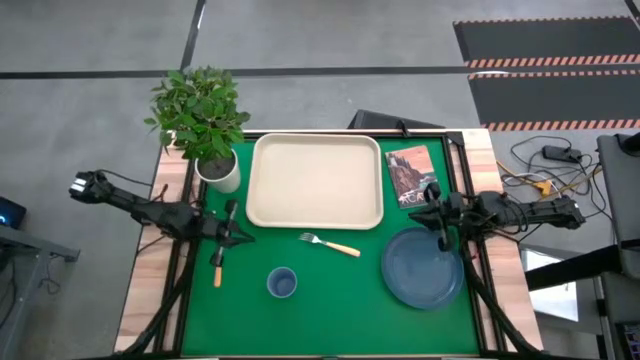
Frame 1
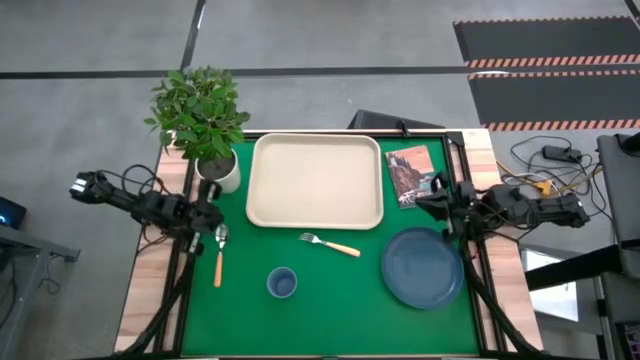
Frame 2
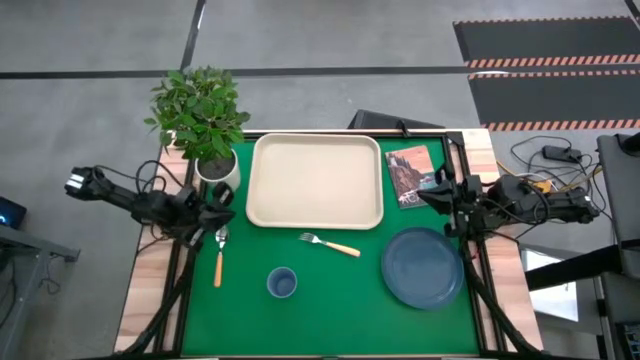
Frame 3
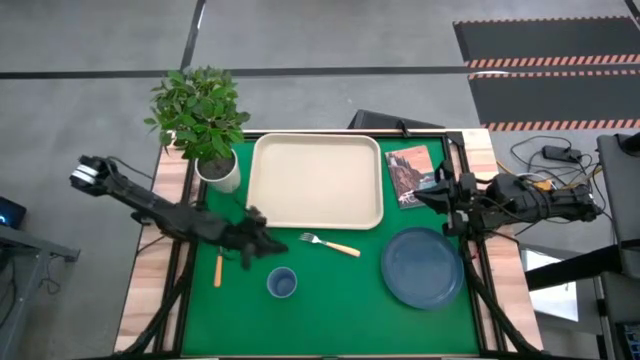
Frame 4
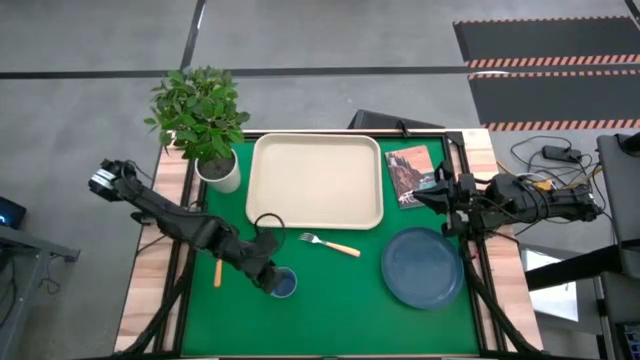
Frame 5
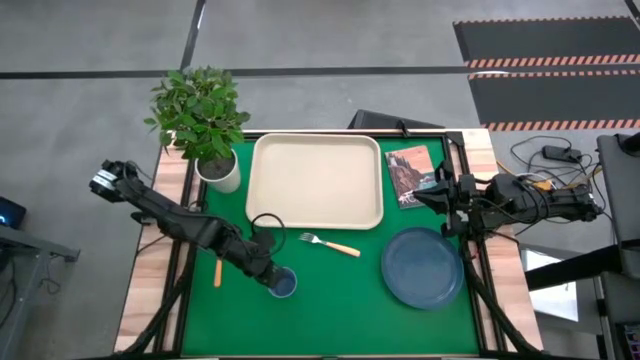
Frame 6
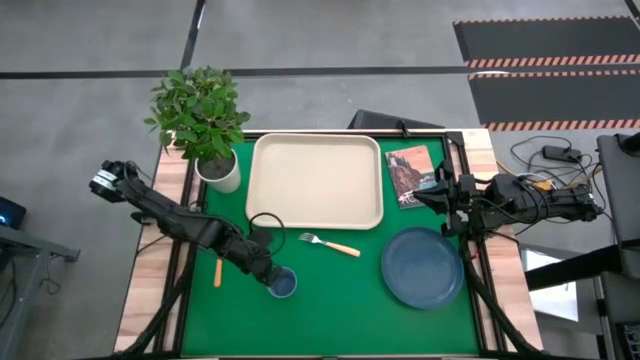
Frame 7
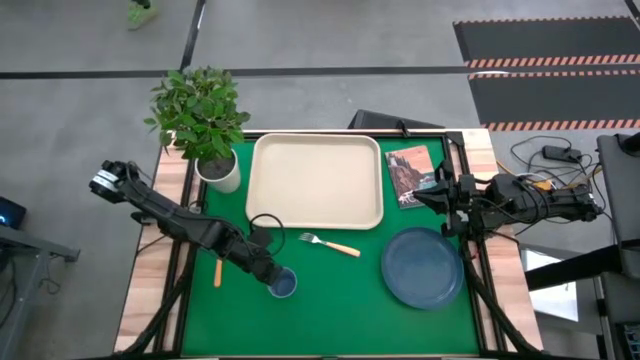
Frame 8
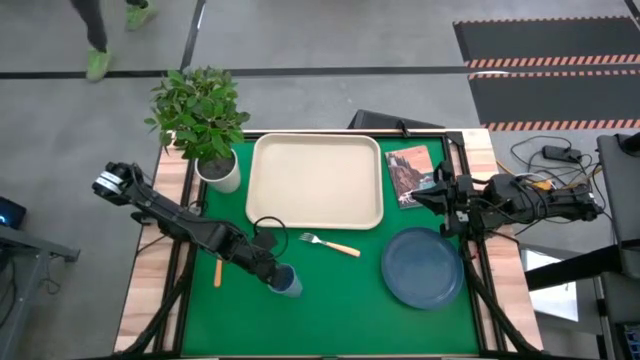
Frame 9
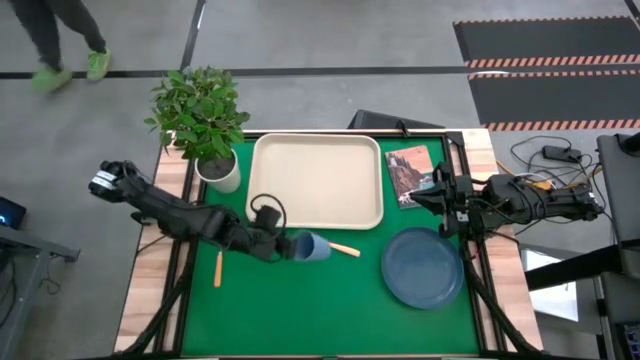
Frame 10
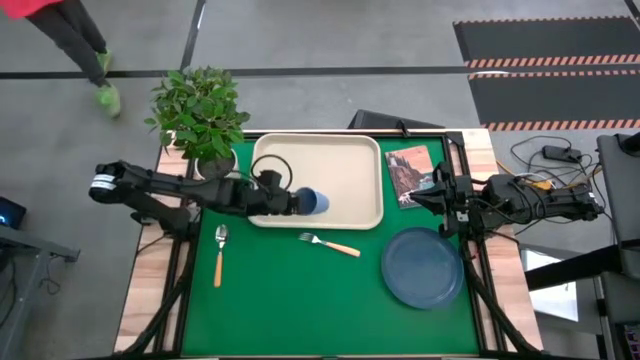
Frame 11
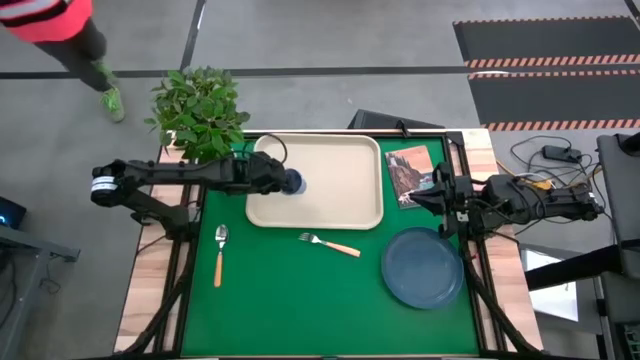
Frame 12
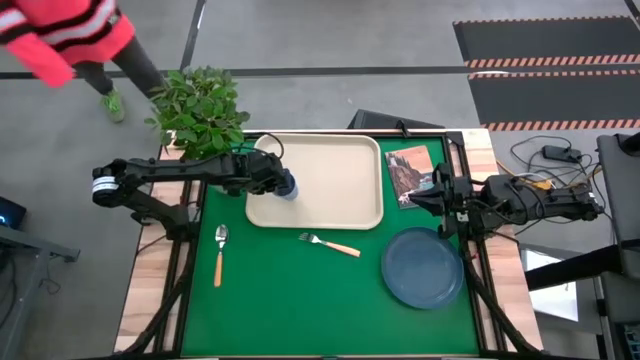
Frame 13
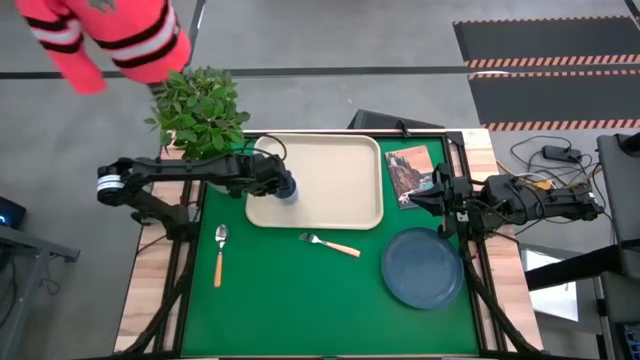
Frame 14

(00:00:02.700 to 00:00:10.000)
Task: Pick and place plate/cup/fork/spoon on tray
Put the blue cup on the white food tray

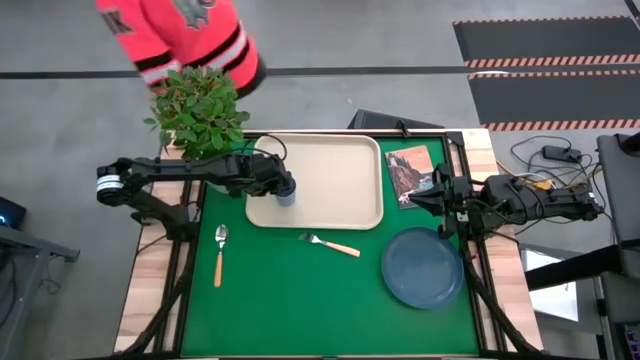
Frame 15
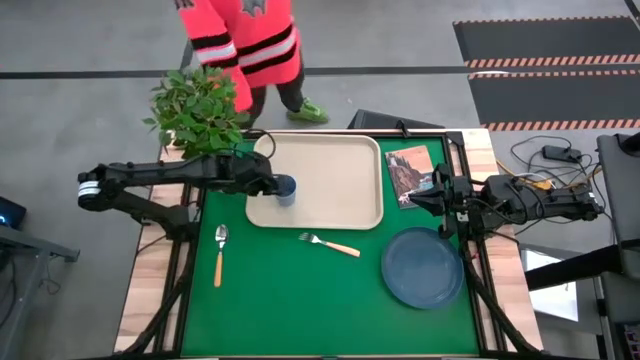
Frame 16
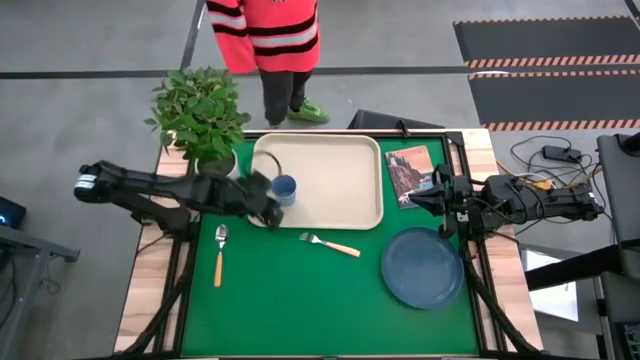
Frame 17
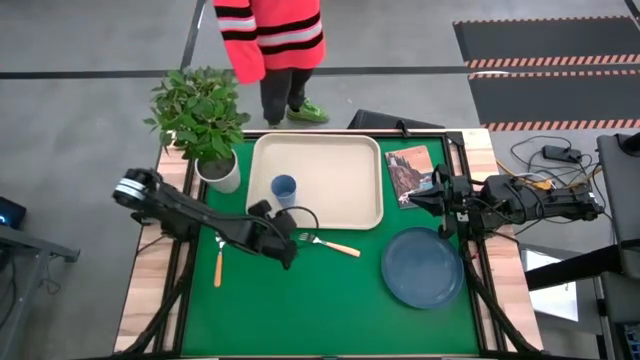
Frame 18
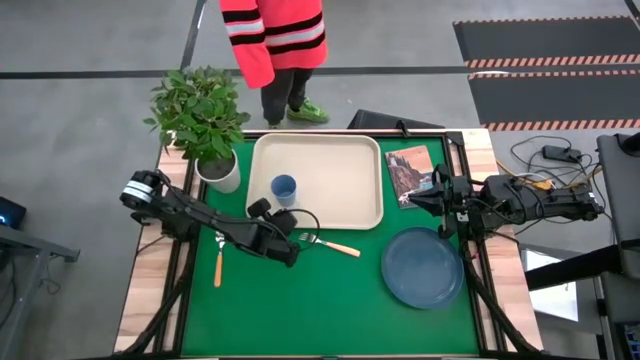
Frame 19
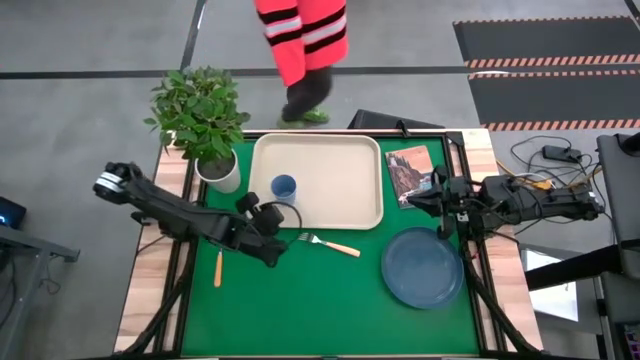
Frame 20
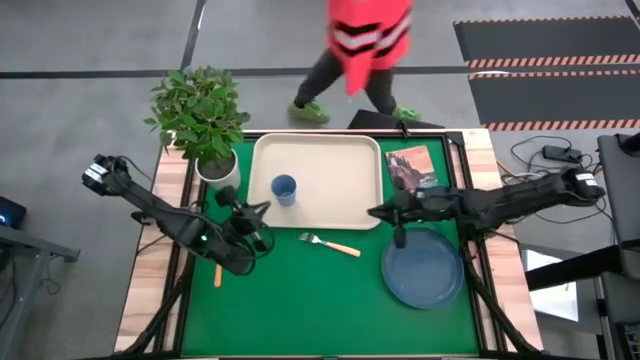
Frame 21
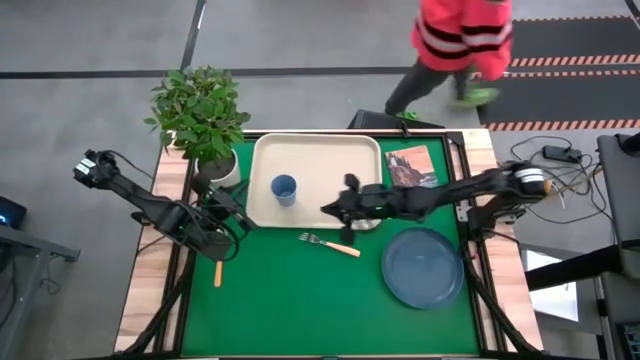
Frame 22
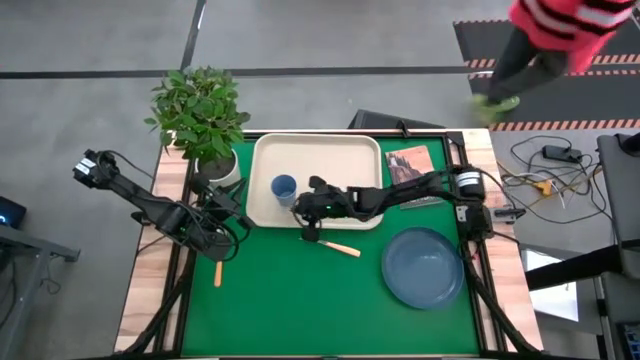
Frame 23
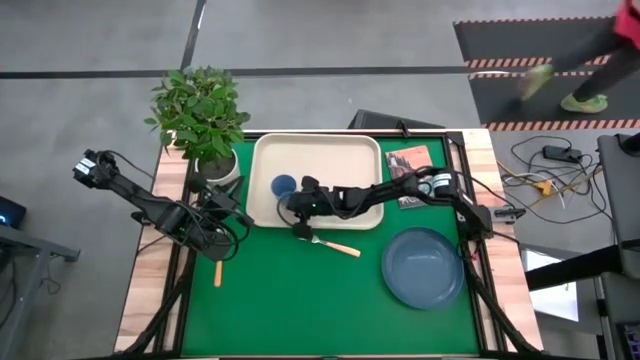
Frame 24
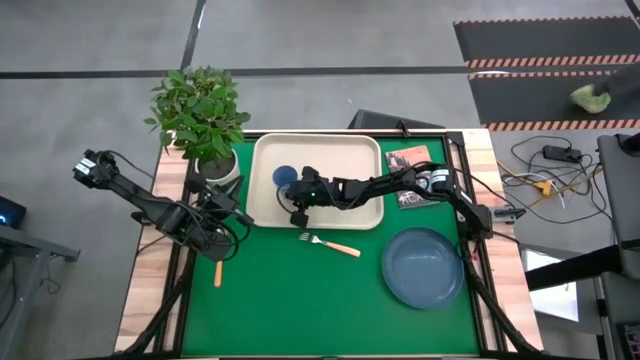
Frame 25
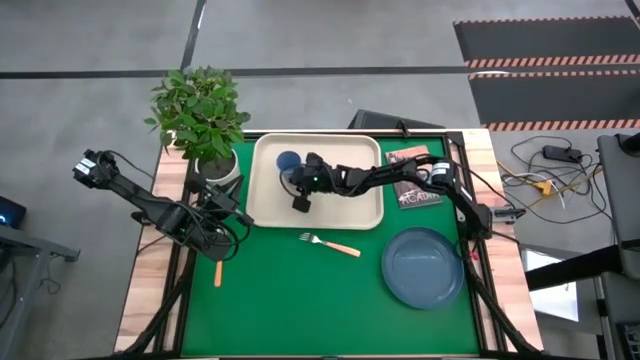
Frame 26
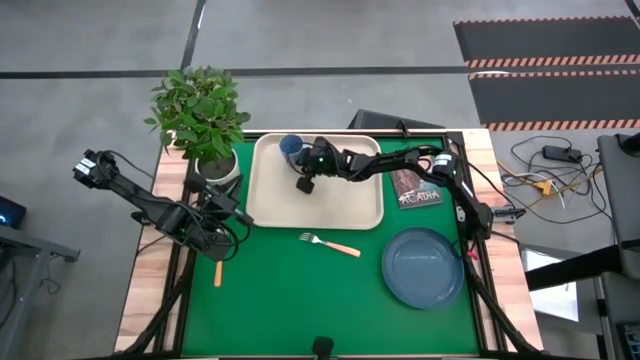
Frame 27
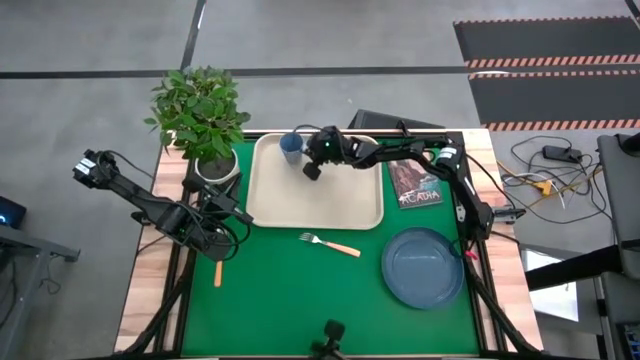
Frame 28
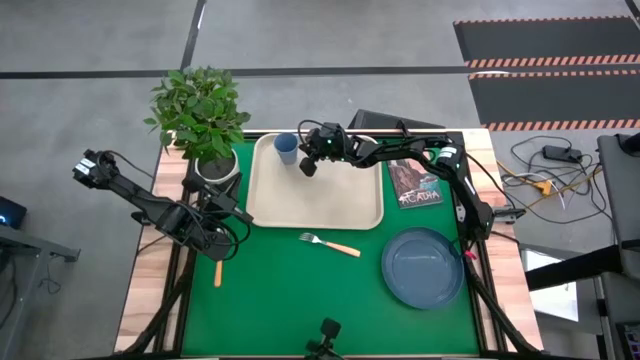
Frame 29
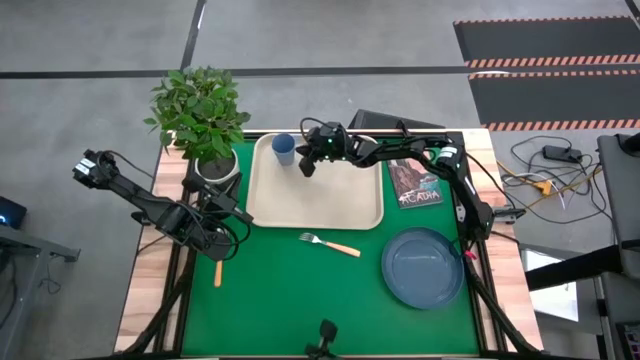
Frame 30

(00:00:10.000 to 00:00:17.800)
Adjust the blue cup on the white food tray

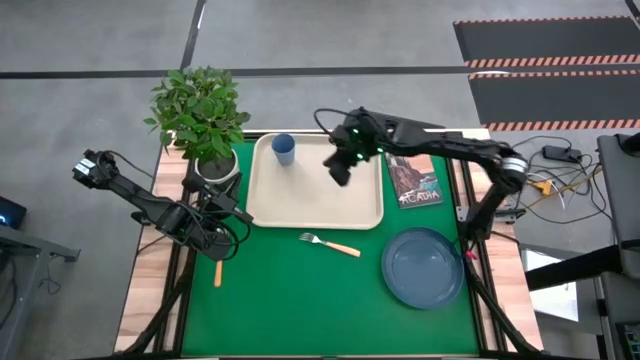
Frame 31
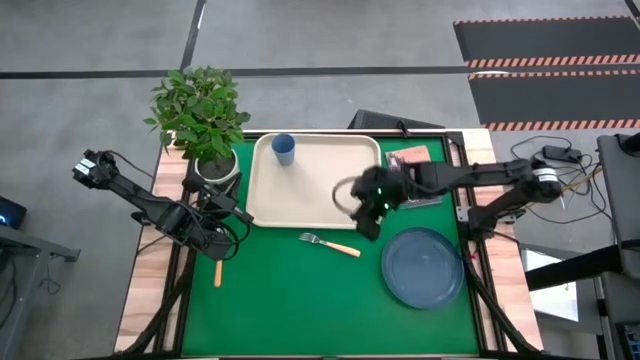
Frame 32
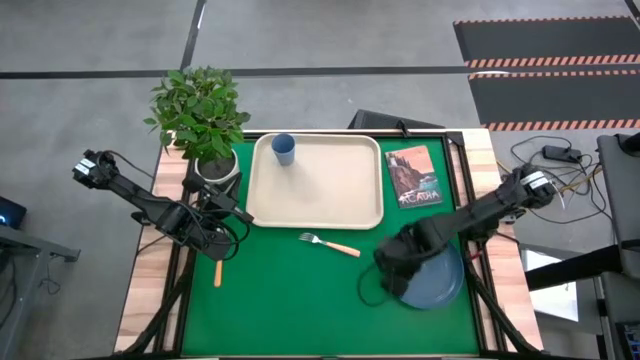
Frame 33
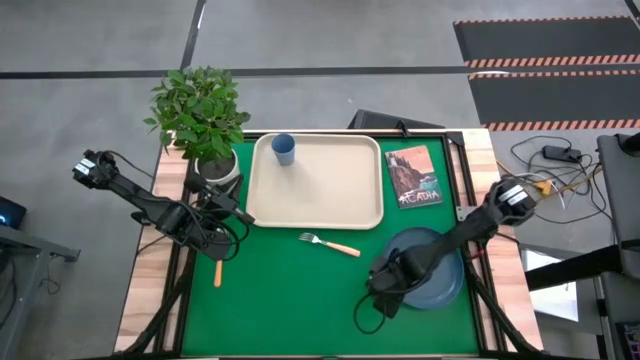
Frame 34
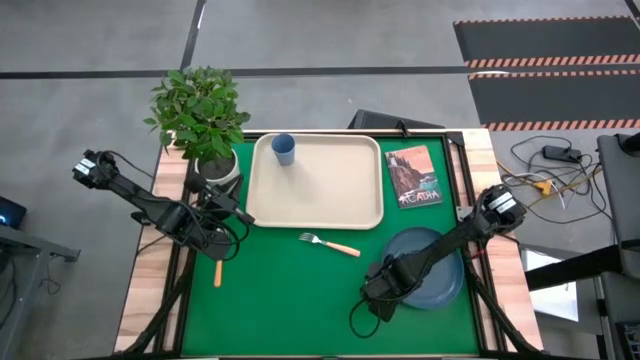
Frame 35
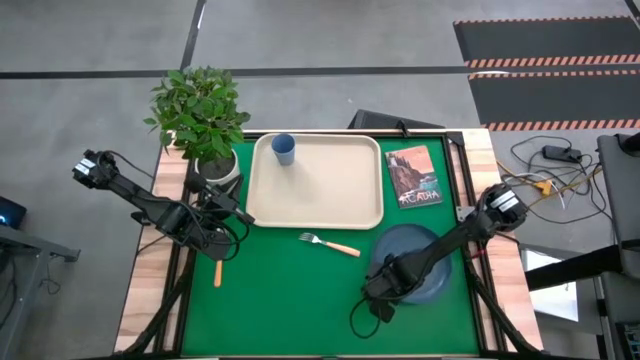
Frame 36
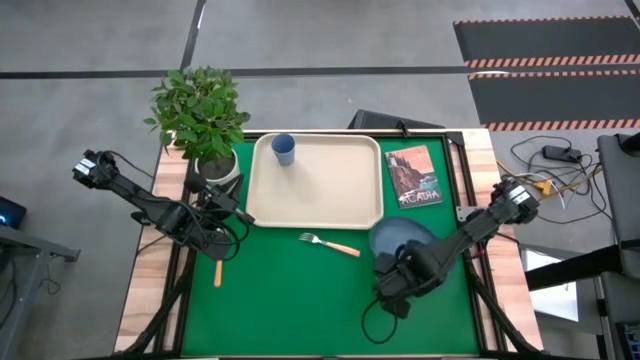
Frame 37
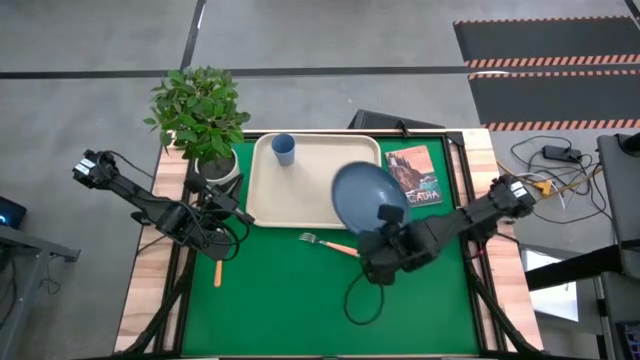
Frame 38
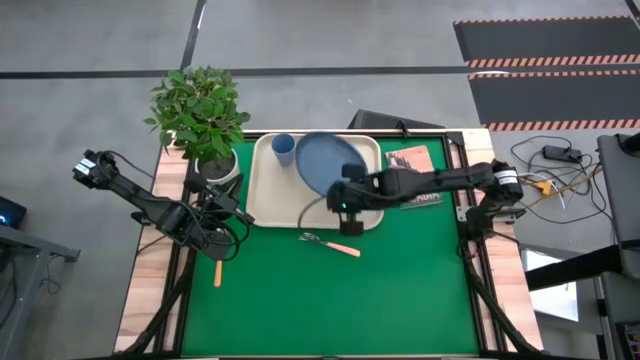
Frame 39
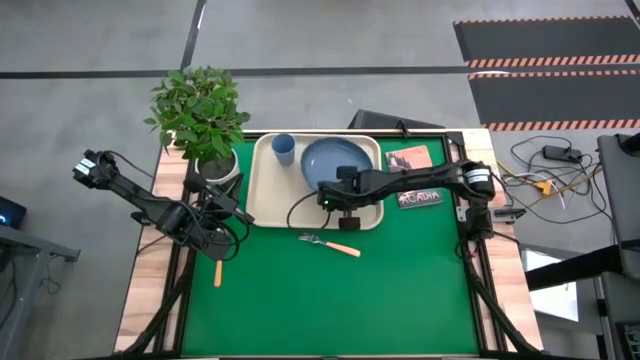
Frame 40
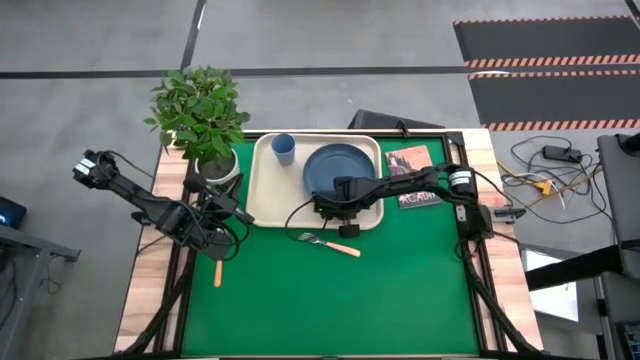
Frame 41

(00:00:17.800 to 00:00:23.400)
Put the blue plate on the white food tray
